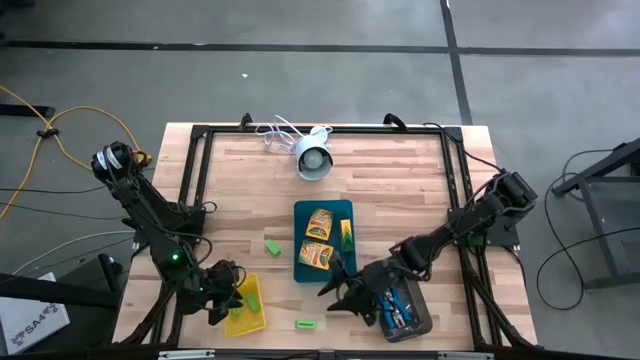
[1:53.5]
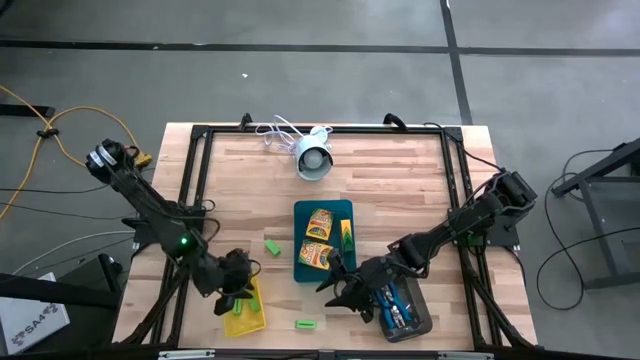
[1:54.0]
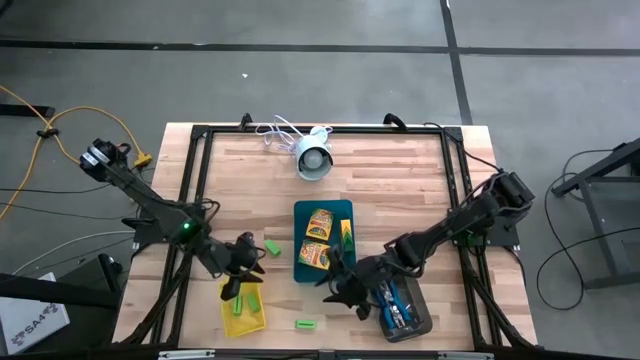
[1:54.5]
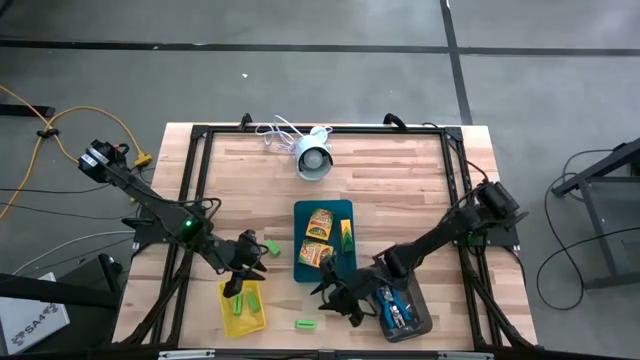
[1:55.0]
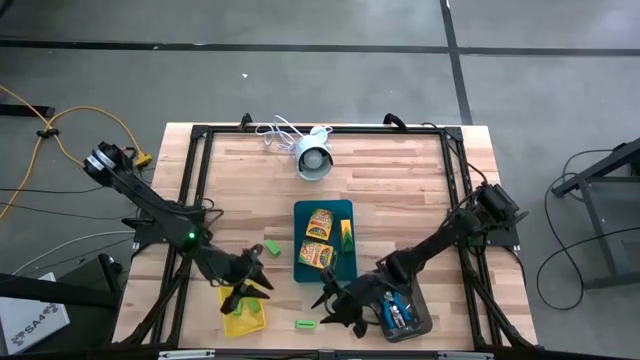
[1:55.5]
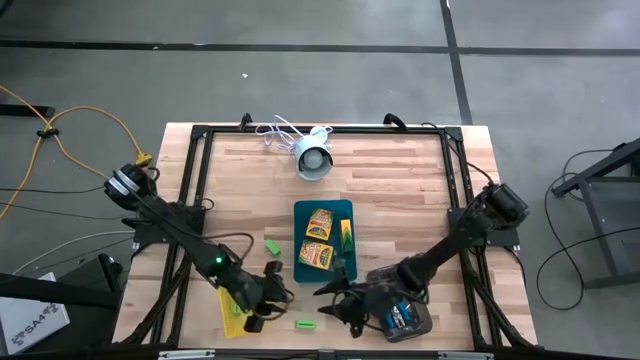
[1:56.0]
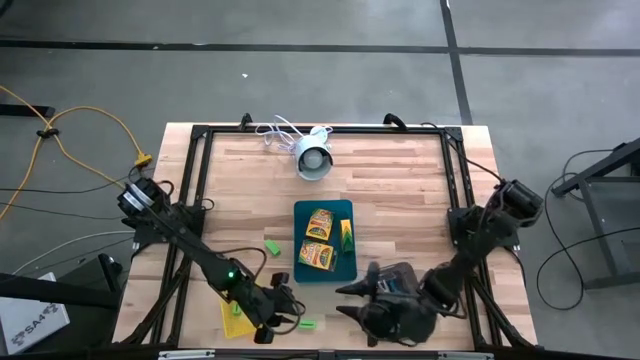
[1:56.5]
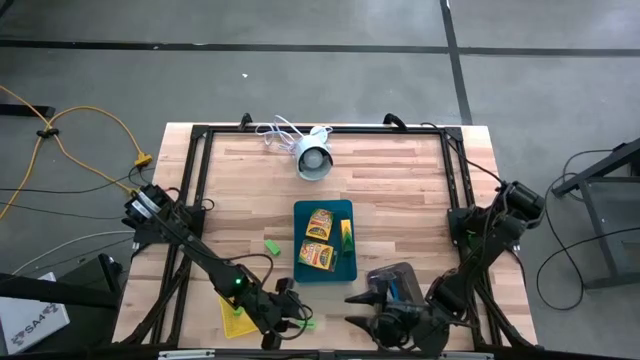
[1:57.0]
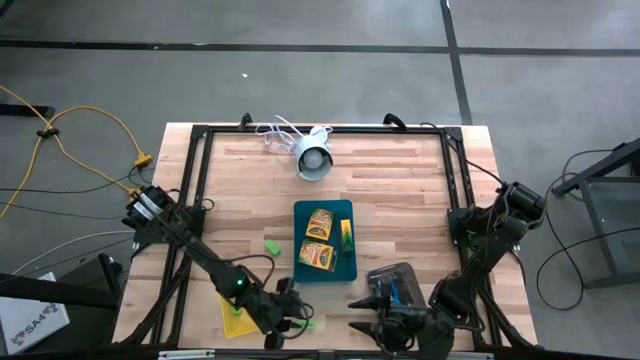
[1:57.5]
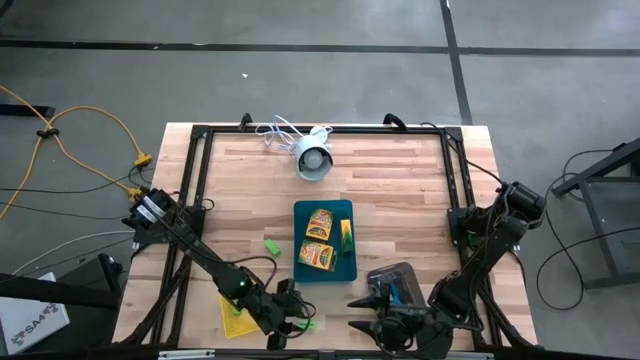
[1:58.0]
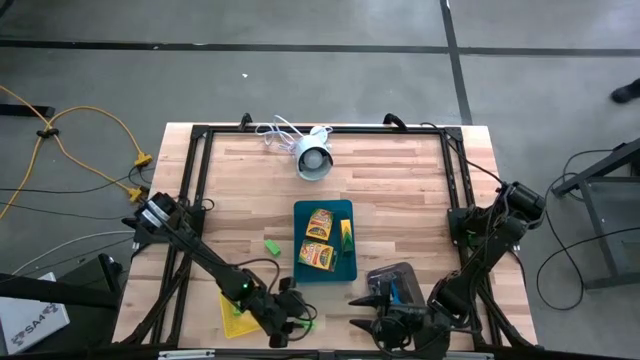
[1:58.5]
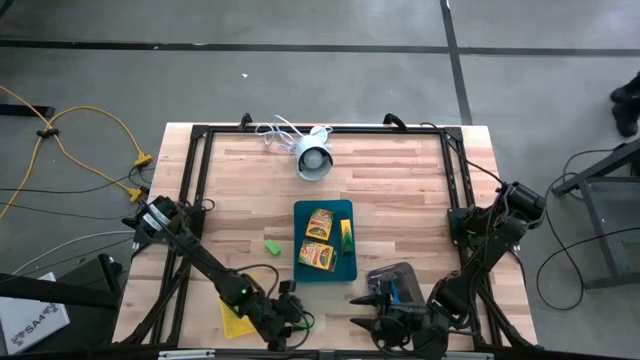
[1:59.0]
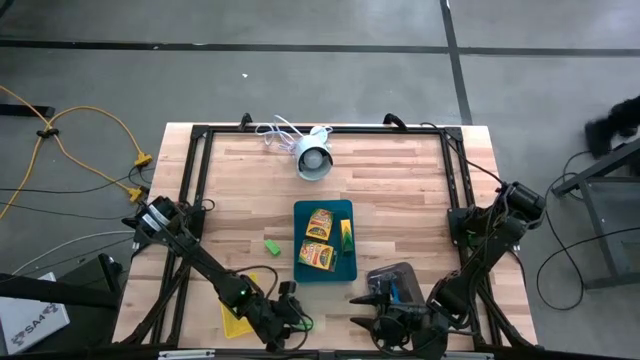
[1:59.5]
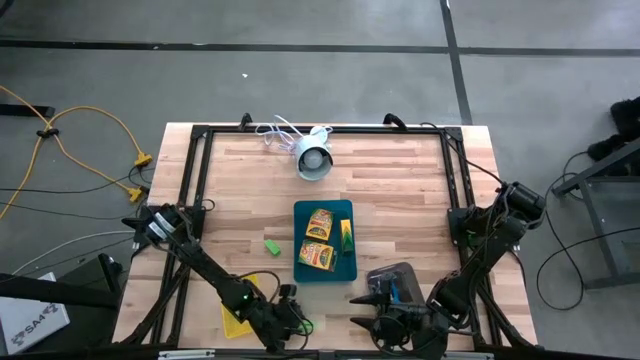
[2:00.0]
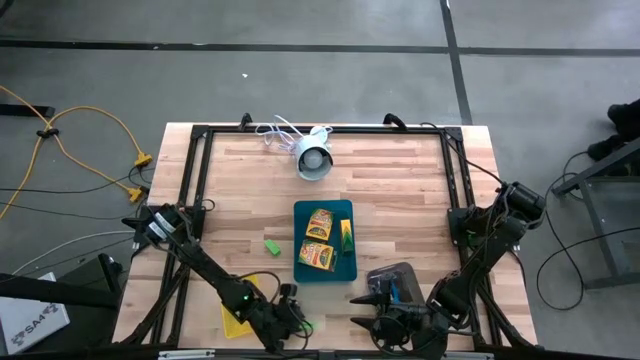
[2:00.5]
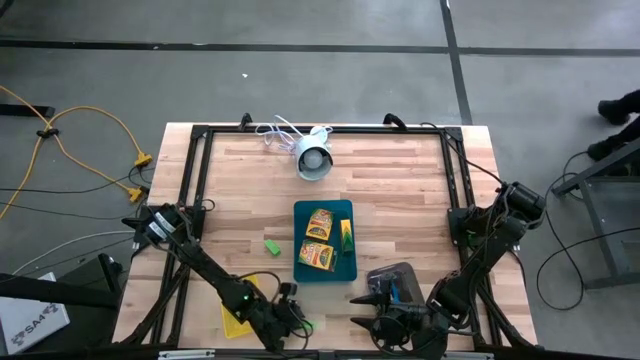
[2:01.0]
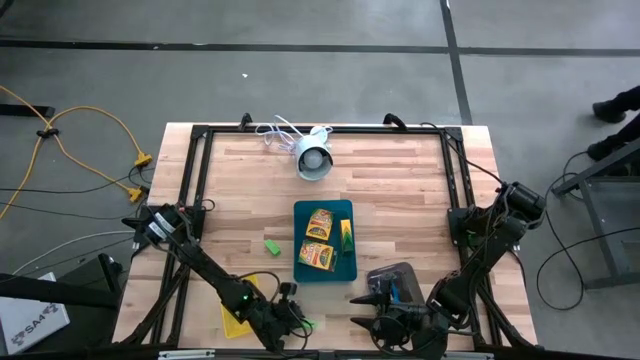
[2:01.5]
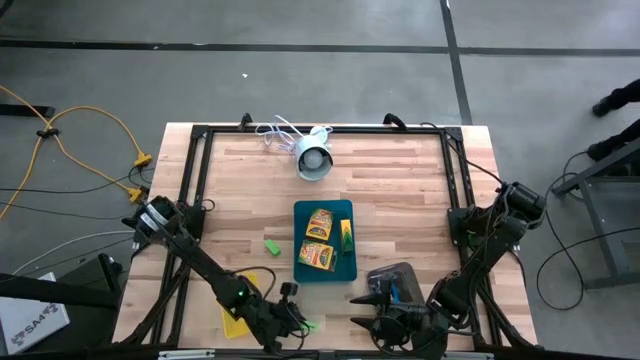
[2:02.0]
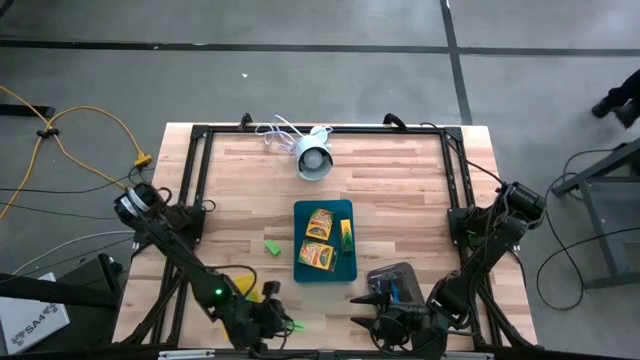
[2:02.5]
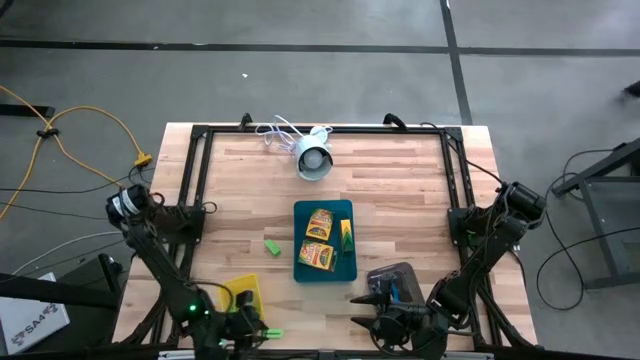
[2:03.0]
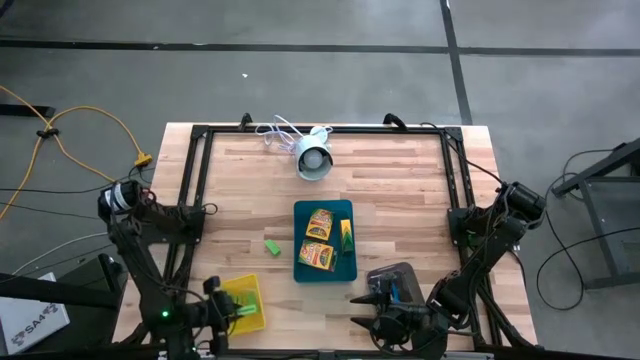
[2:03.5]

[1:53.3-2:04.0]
Task: Pick & Place School Supplies
Put the green eraser into the yellow bin

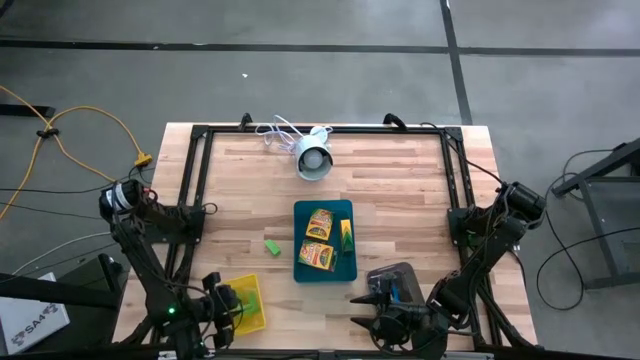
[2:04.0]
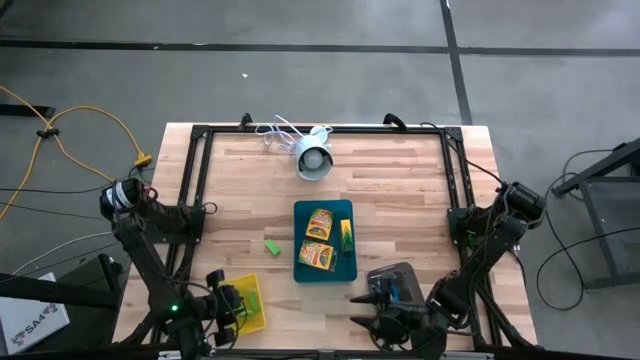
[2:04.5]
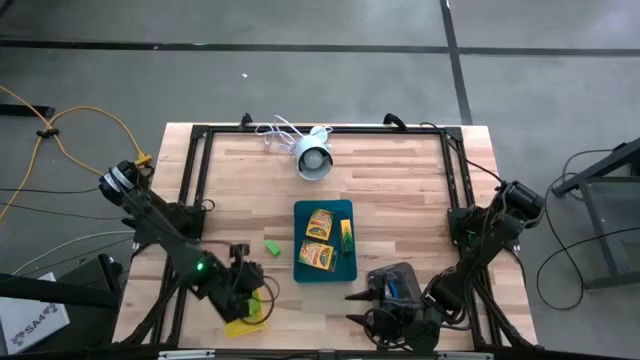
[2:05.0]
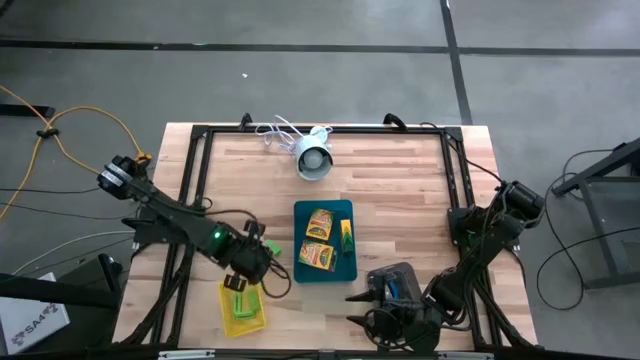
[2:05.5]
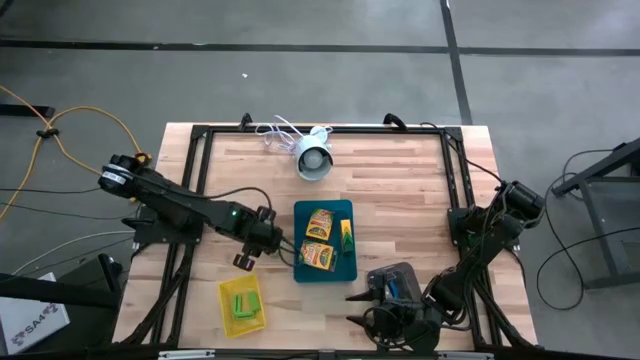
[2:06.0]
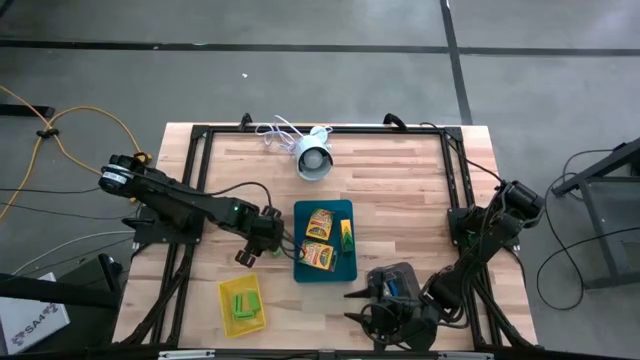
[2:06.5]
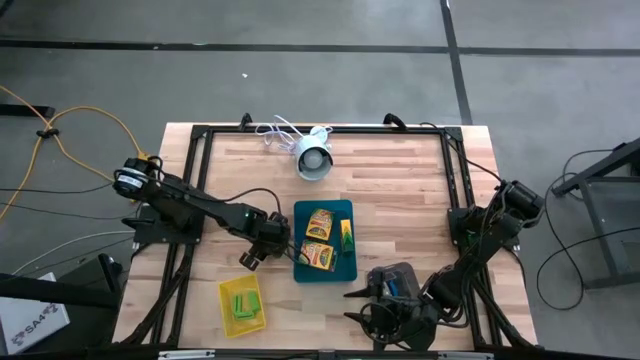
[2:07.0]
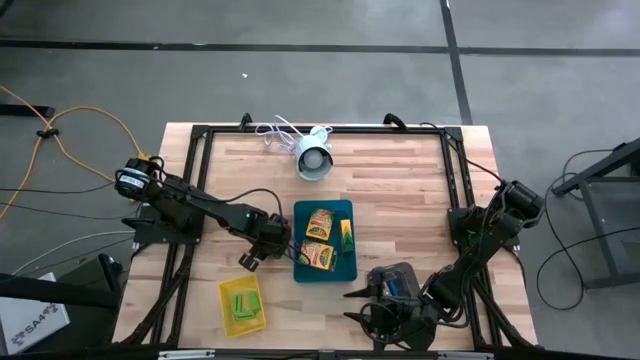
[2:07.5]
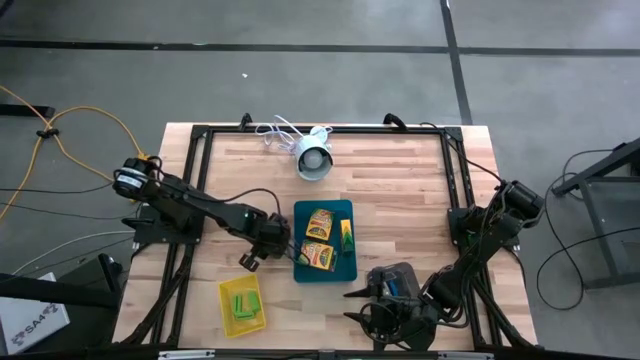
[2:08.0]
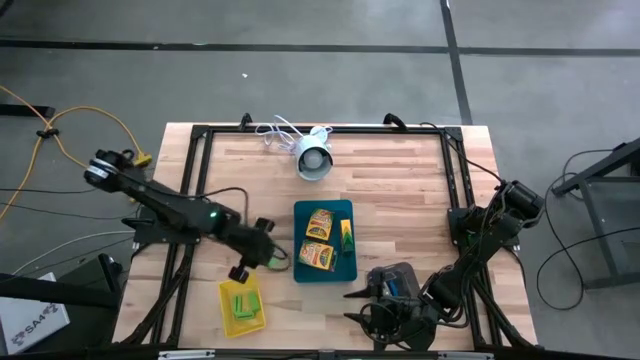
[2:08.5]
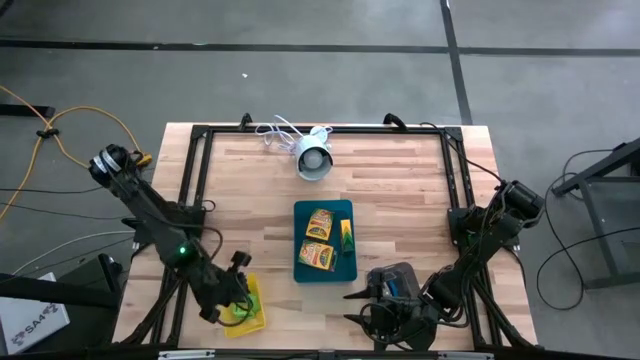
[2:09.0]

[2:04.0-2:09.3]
Put the green eraser into the yellow bin

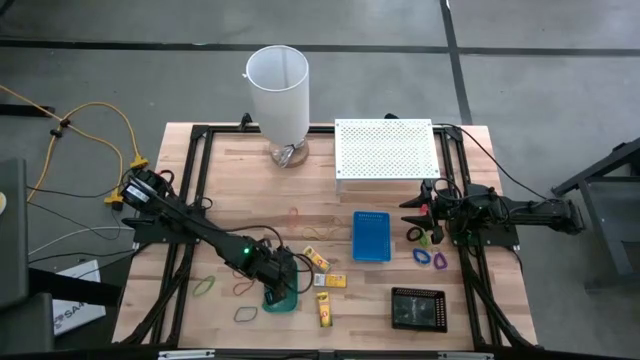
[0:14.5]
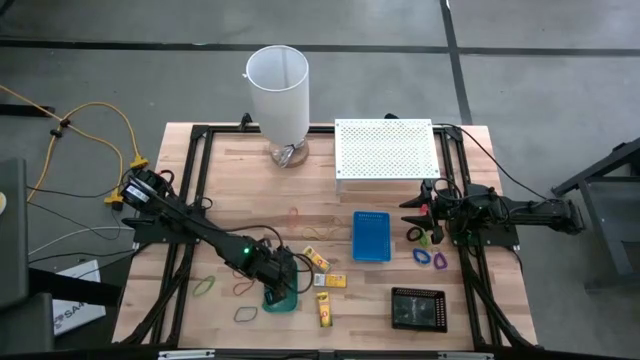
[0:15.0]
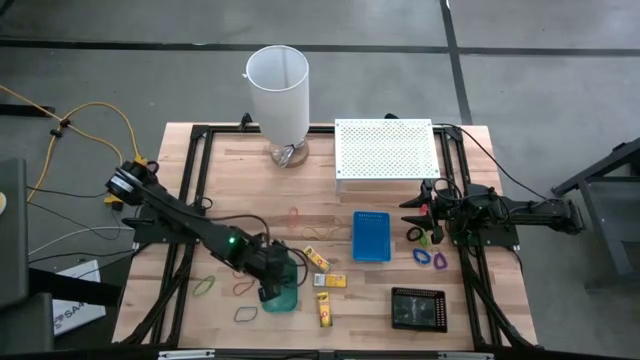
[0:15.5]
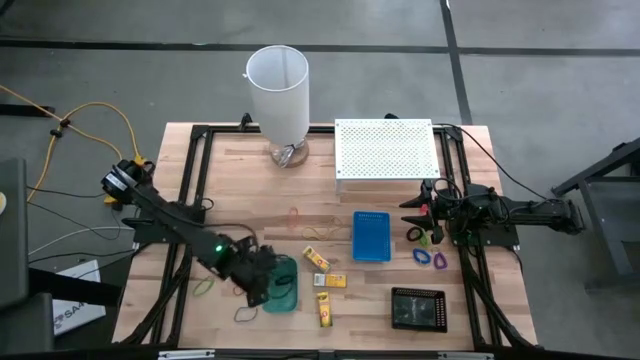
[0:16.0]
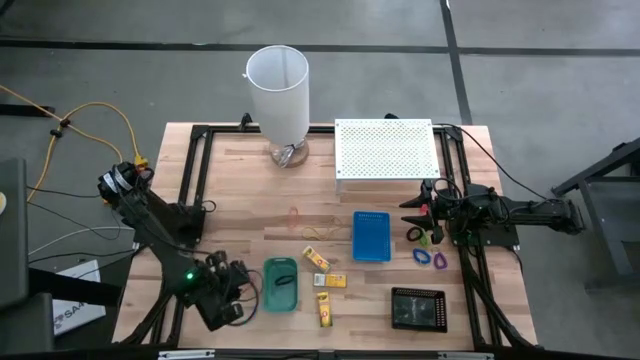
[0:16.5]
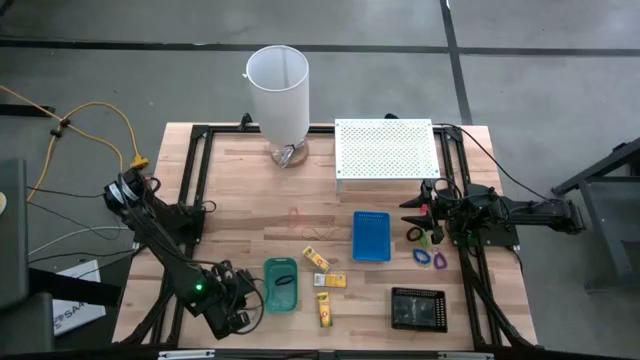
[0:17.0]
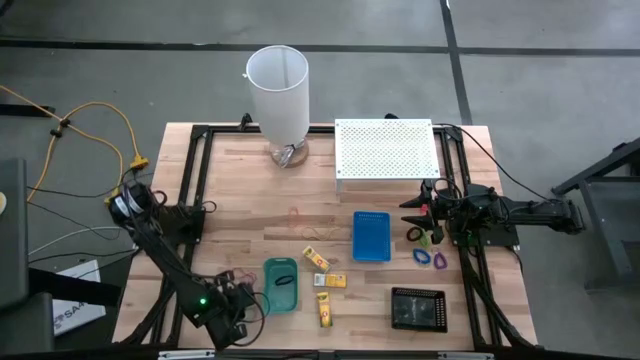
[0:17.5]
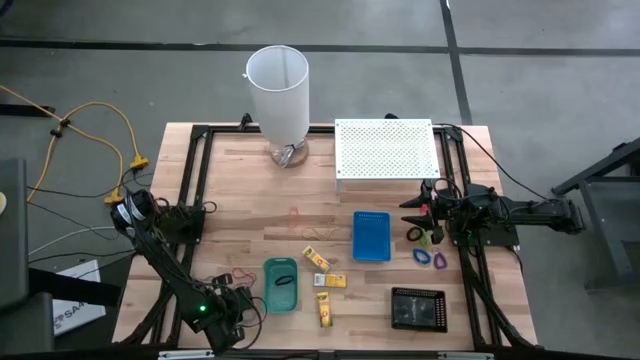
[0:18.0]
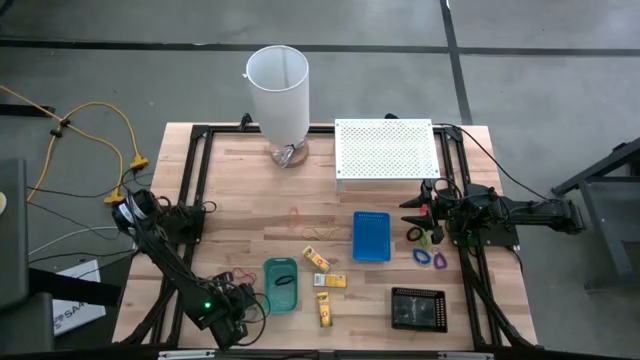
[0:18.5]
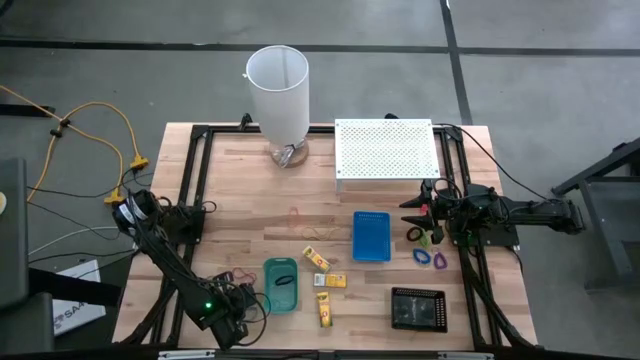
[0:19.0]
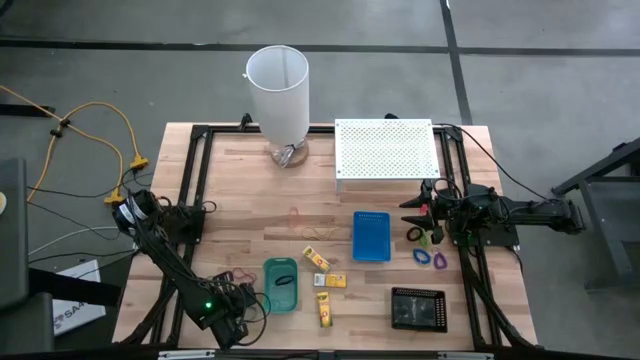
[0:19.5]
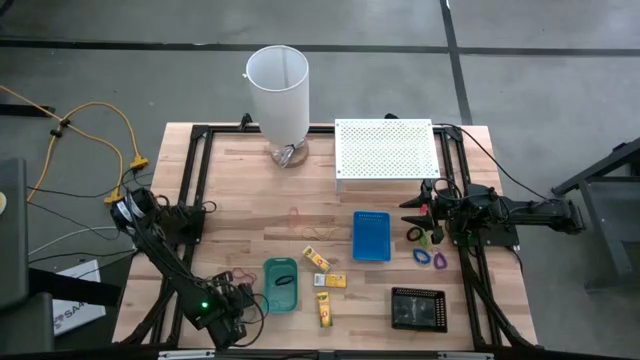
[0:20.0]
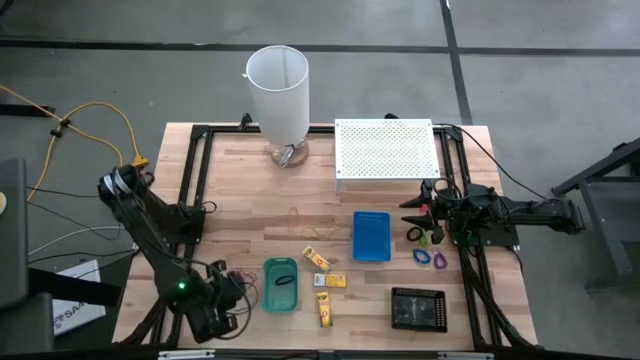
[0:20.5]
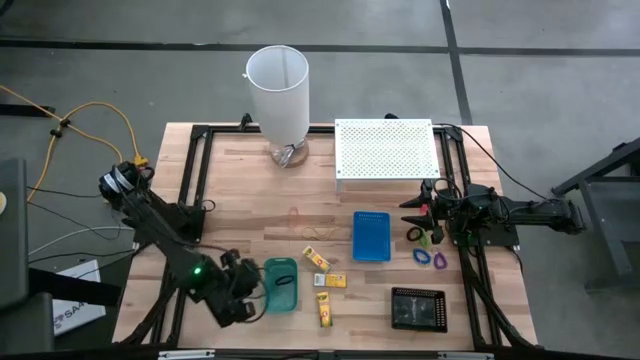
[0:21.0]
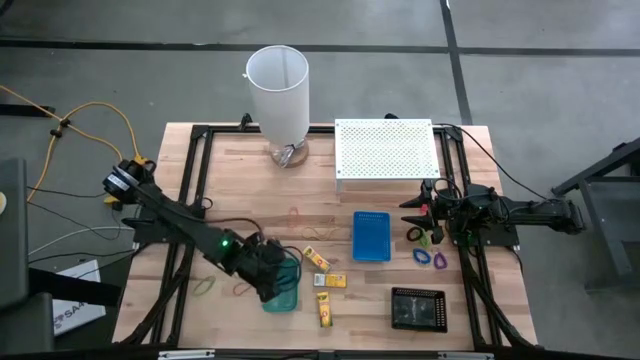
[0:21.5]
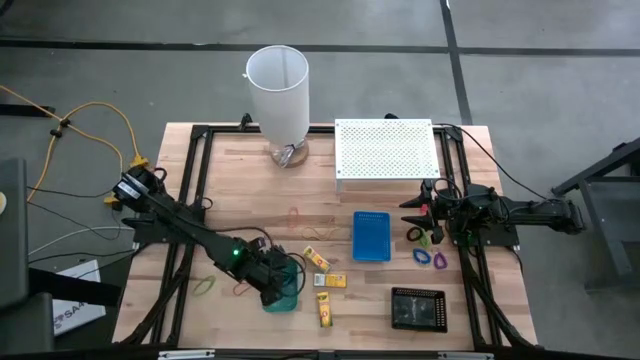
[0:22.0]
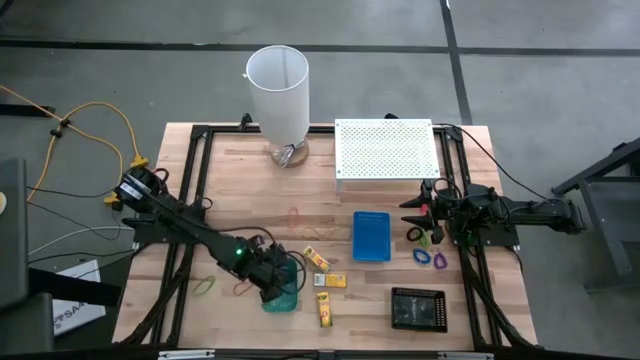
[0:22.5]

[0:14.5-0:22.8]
Task: Pick & Place Office Desk Supplies
Put the blue rubber band into the green bin
